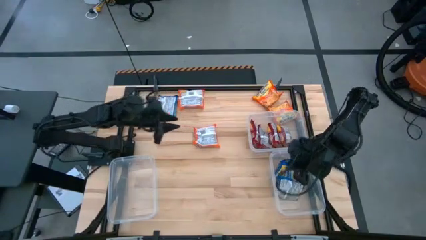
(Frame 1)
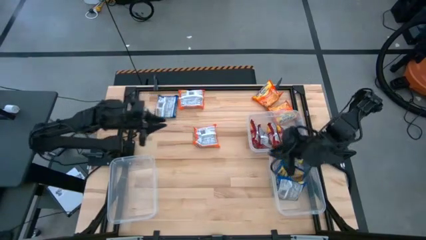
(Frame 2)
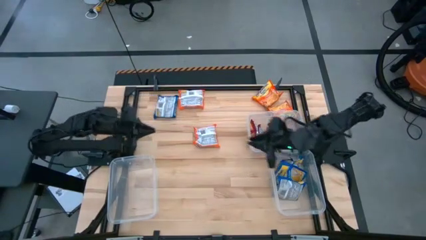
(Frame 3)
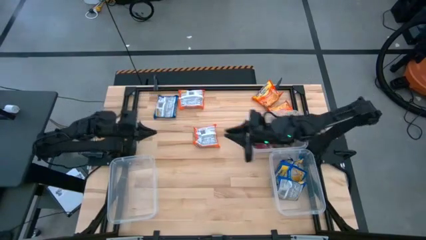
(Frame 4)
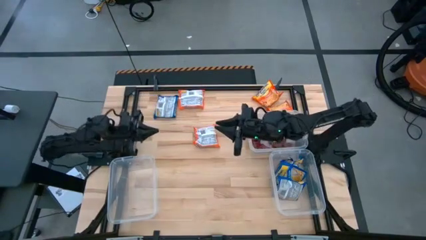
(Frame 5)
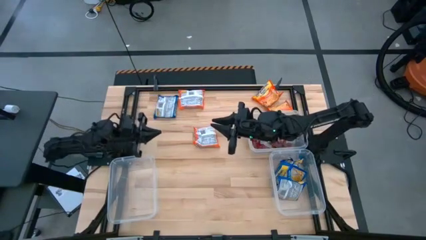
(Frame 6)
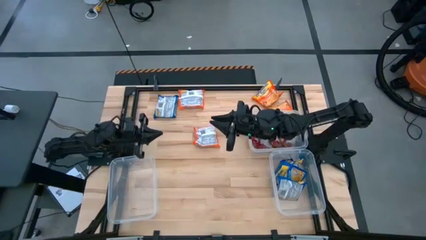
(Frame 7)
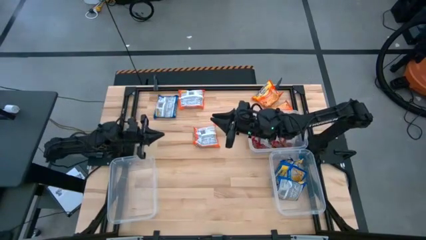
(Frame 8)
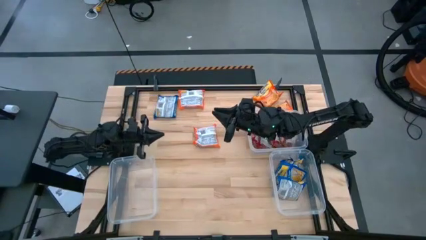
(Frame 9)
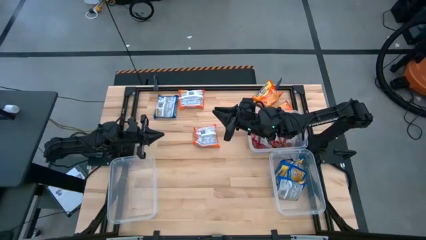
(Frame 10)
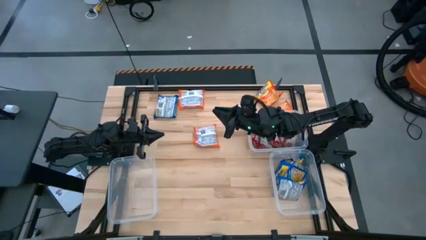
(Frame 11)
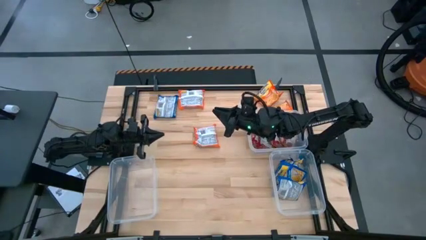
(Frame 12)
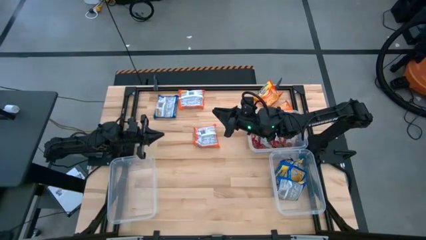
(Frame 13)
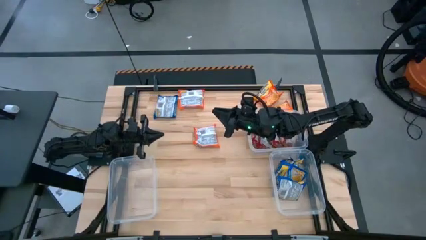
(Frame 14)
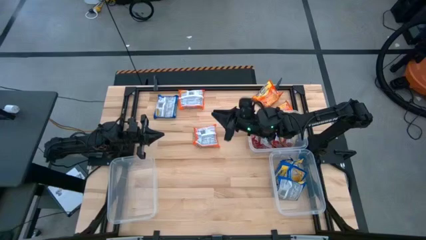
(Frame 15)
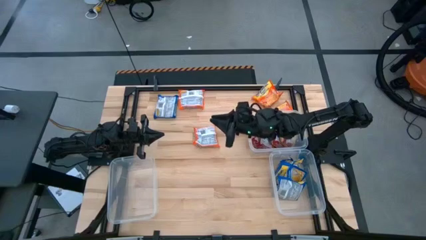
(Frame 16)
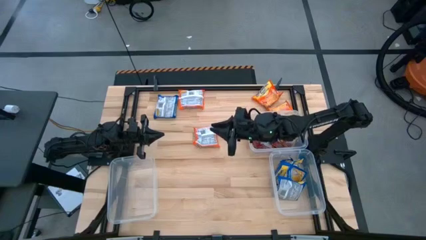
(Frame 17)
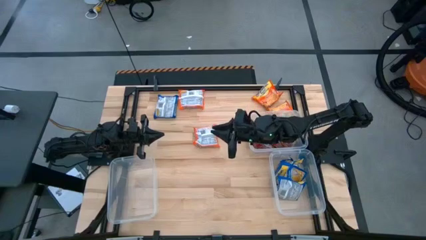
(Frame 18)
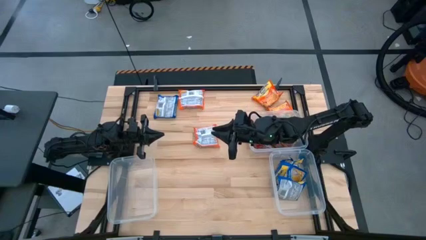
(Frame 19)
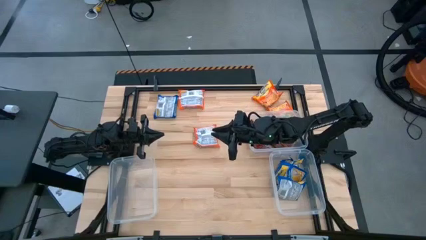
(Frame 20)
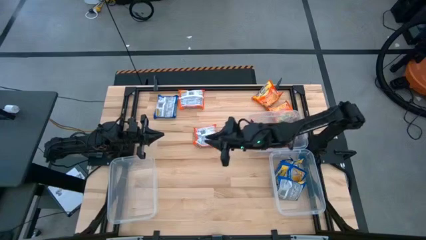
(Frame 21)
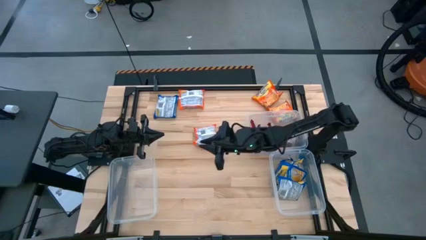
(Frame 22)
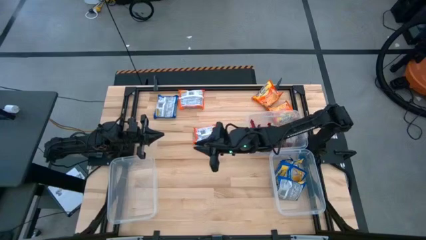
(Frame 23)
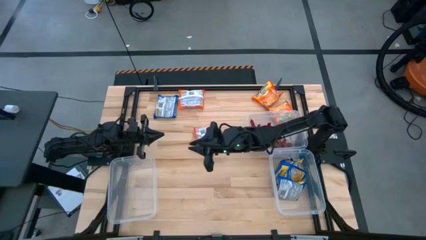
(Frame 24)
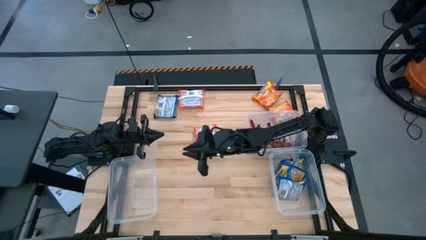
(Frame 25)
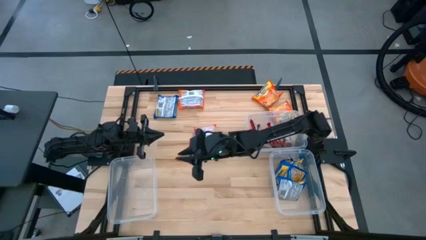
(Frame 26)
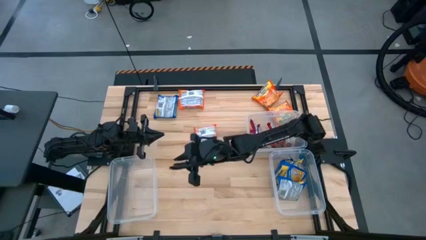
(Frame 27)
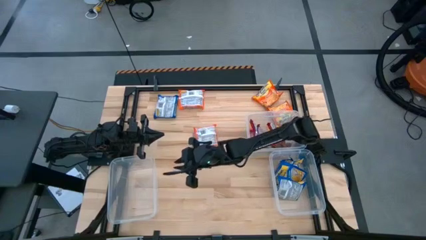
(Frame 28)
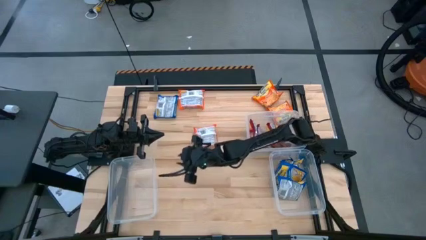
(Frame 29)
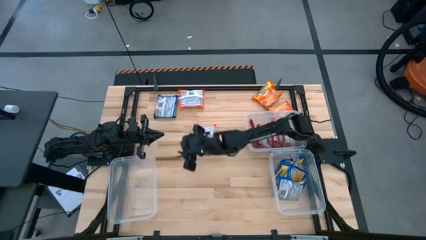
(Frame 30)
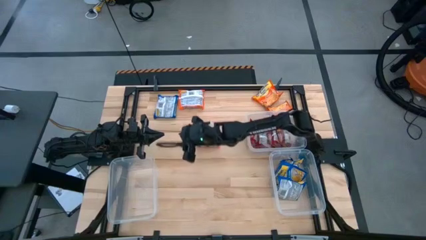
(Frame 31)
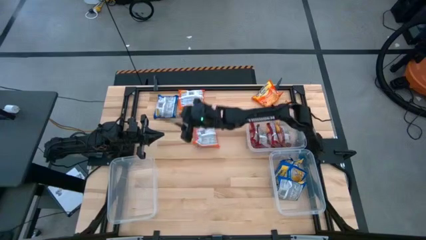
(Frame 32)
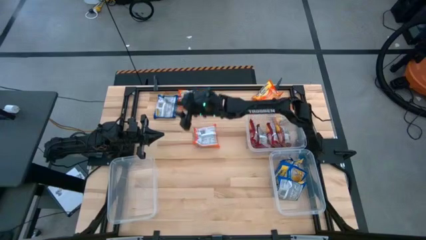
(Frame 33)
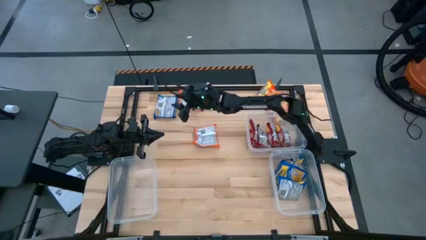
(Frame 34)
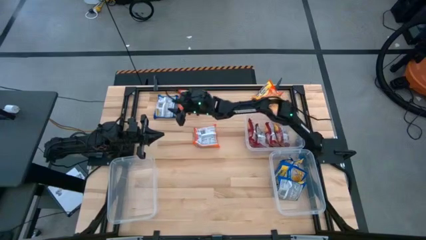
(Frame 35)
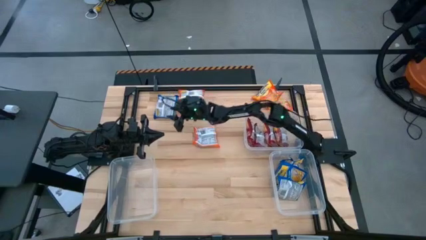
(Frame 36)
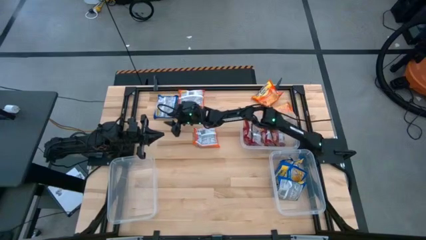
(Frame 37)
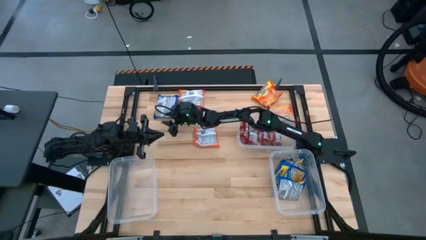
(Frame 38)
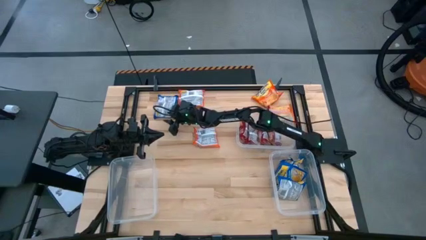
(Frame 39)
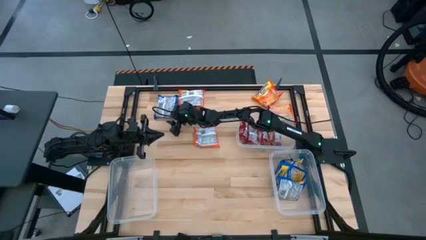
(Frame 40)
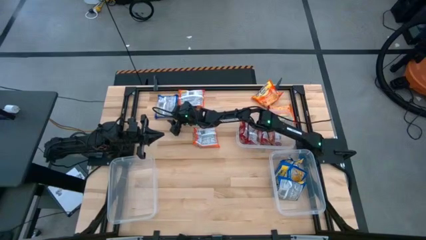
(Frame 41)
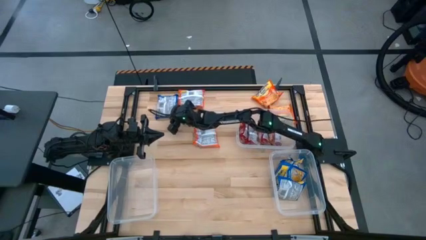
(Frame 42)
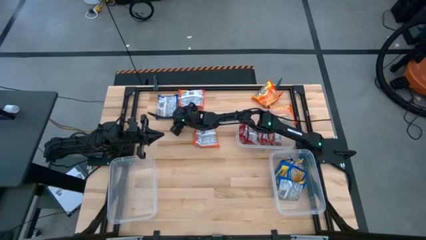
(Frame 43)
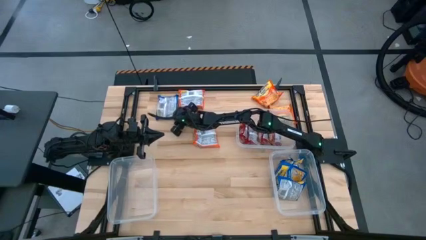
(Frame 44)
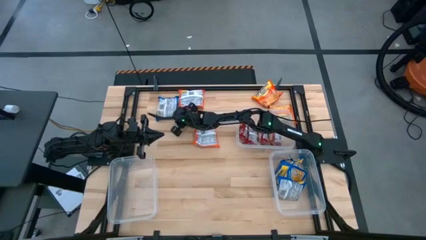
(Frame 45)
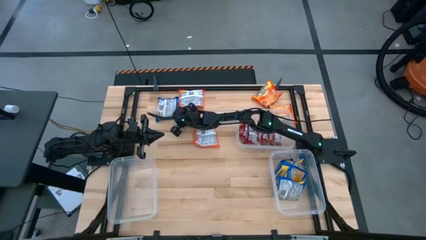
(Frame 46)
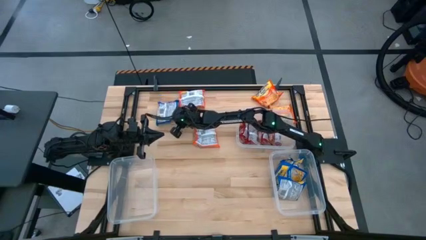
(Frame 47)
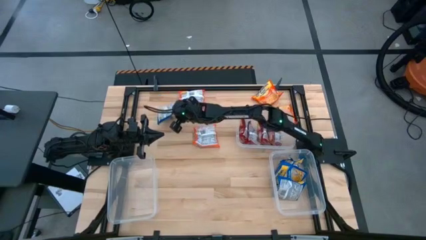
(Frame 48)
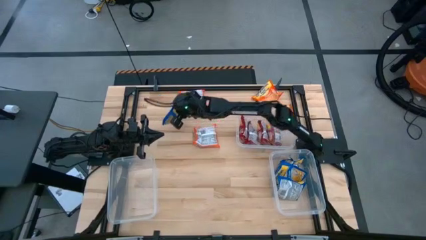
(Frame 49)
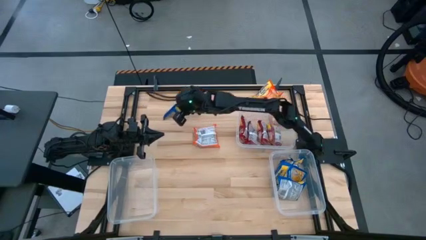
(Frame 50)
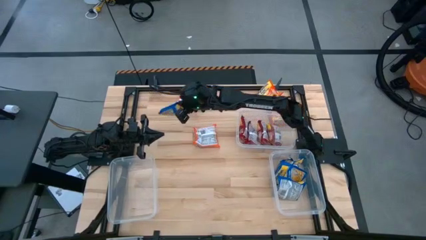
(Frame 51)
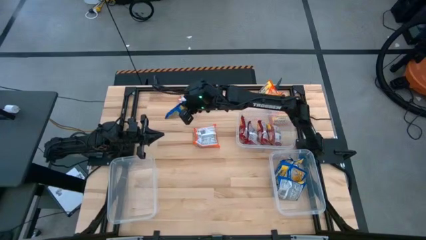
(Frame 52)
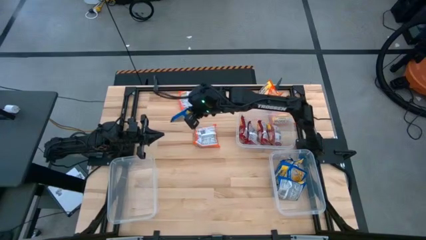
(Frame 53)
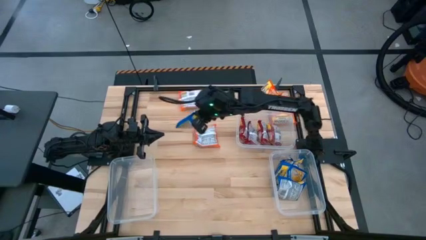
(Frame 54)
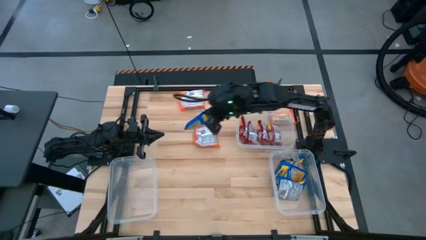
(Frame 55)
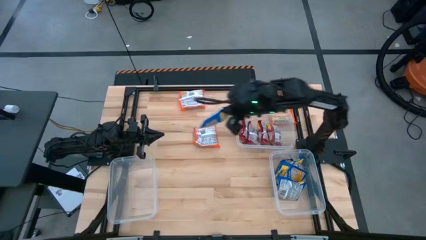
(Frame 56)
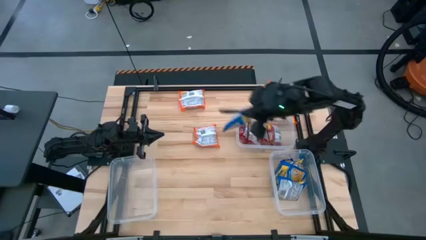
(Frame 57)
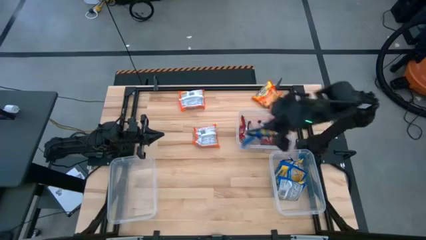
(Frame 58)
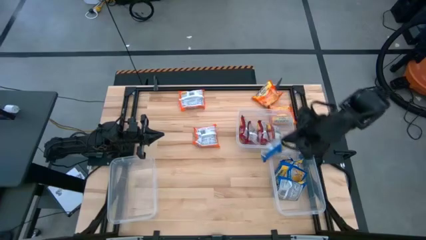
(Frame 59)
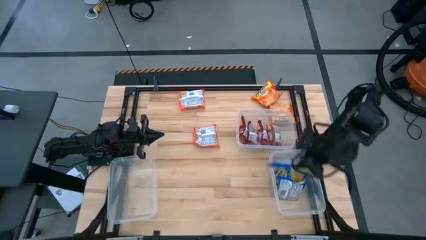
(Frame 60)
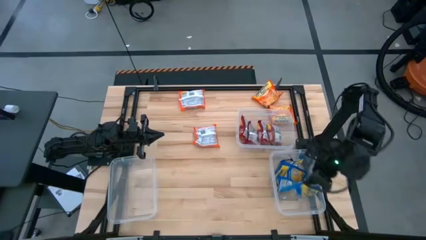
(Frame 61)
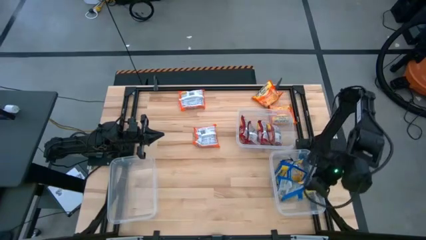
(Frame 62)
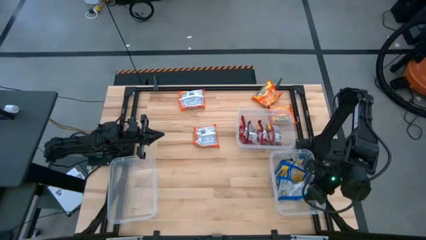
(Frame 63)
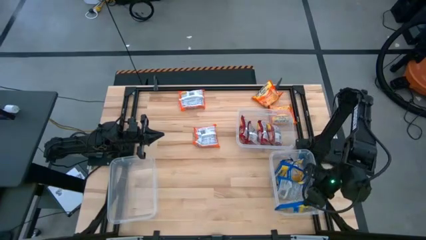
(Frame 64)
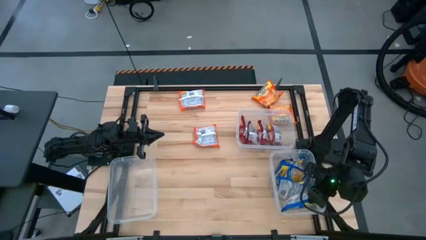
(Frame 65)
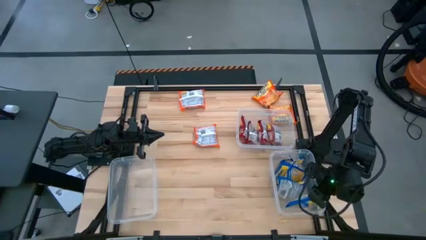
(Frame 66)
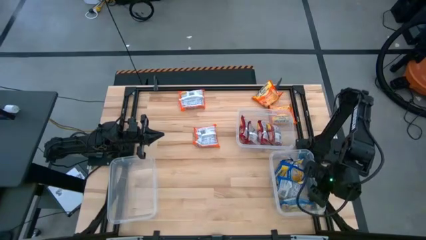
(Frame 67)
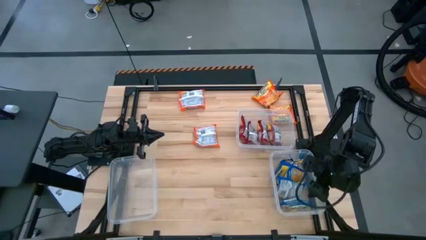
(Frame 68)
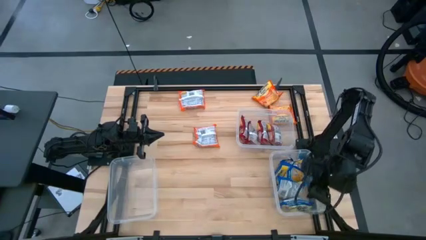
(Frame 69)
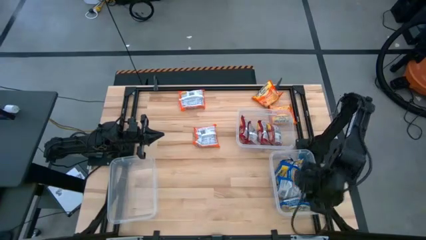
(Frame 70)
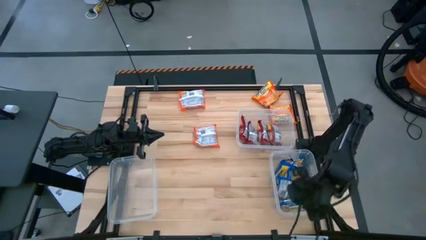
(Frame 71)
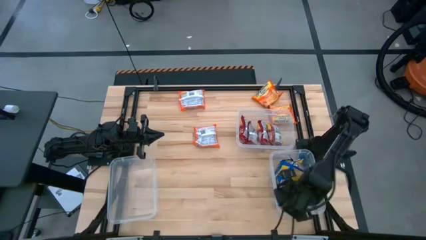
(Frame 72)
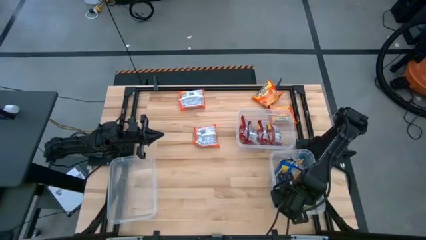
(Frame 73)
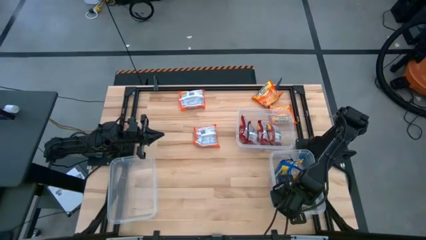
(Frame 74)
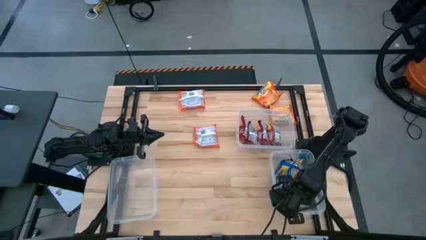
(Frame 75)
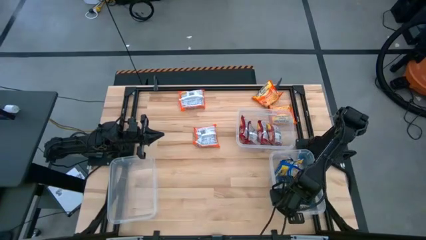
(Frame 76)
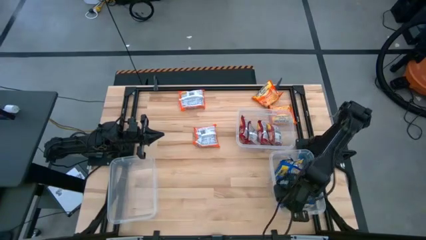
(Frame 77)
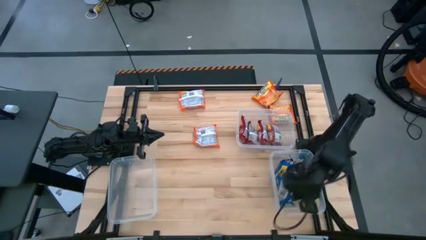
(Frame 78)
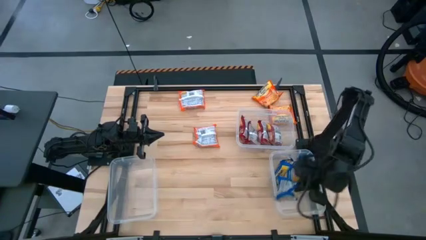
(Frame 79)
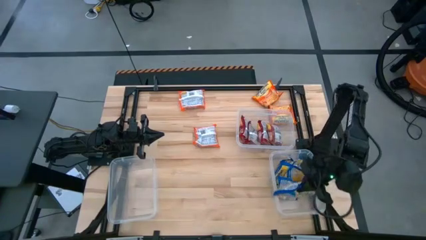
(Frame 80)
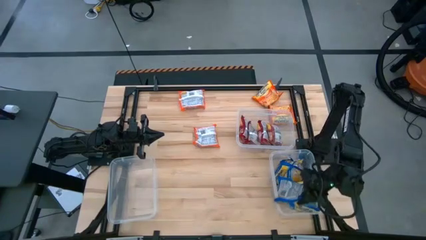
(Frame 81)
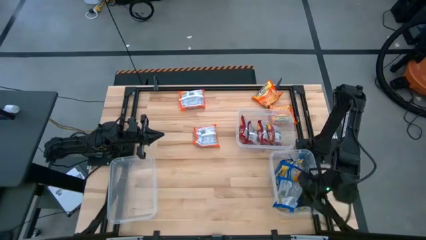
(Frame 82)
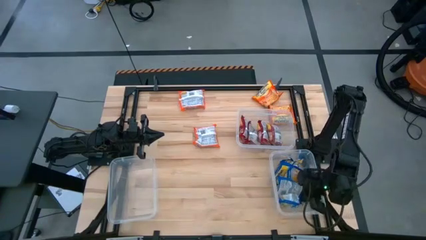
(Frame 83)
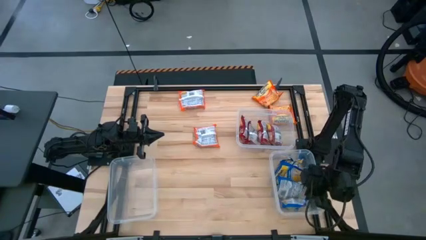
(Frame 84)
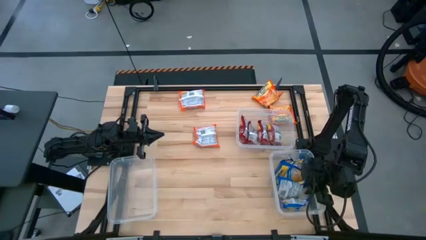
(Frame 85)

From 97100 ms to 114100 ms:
Task: Sort Maruchan noodles
Put the blue noodle pack into the bottom right container
